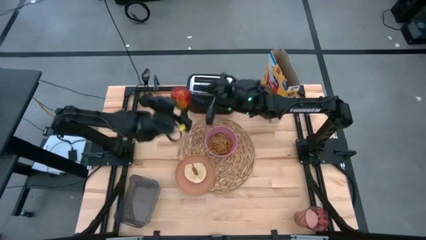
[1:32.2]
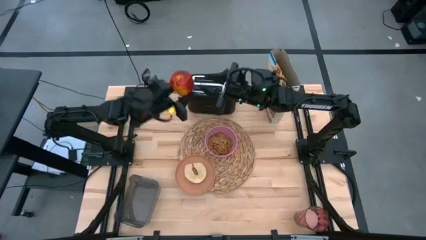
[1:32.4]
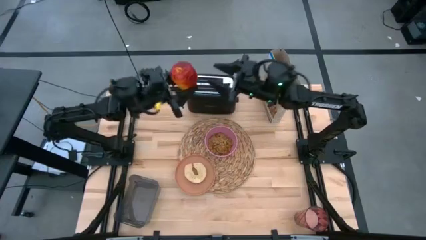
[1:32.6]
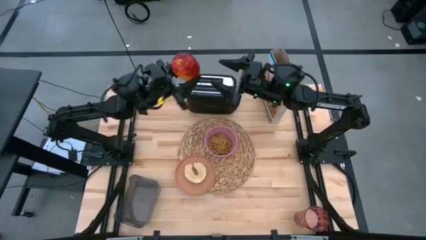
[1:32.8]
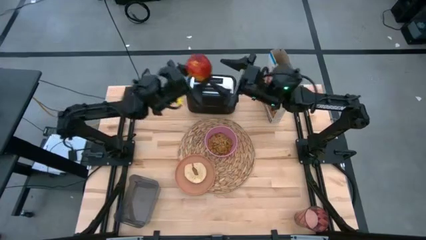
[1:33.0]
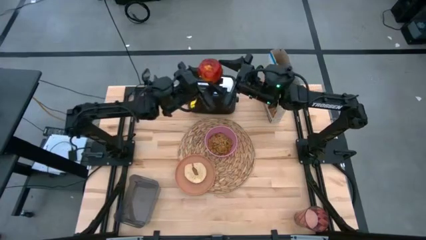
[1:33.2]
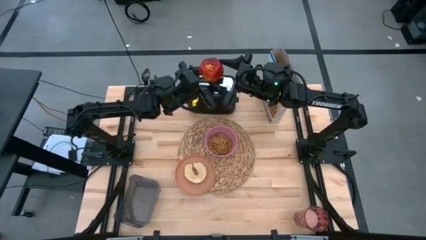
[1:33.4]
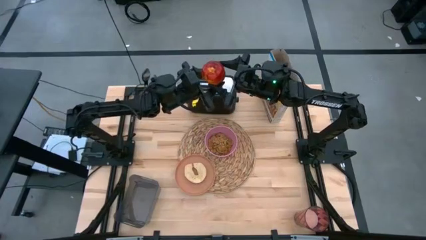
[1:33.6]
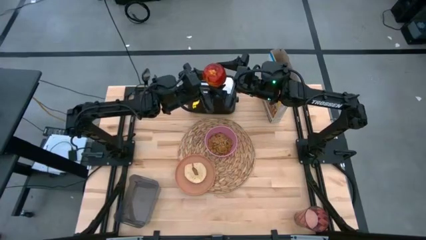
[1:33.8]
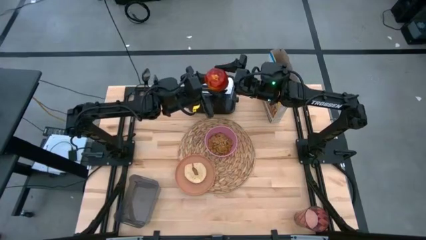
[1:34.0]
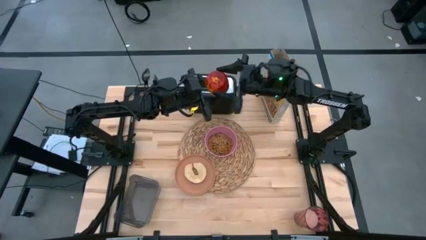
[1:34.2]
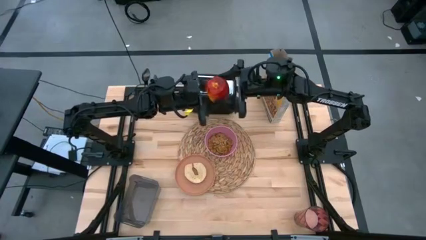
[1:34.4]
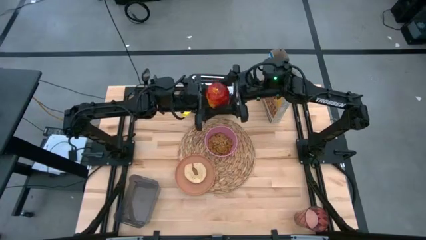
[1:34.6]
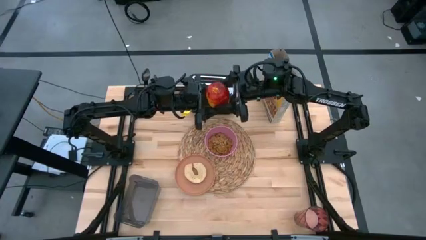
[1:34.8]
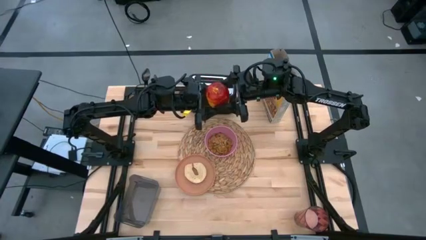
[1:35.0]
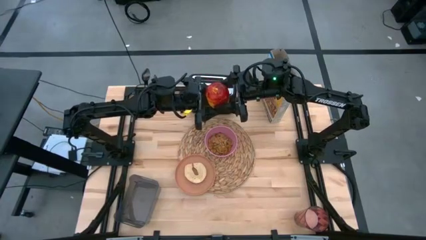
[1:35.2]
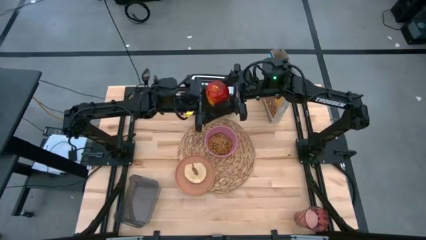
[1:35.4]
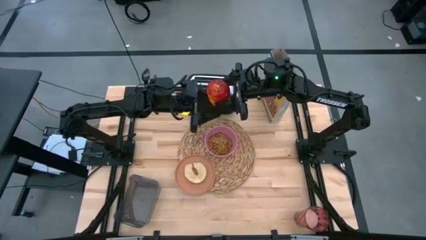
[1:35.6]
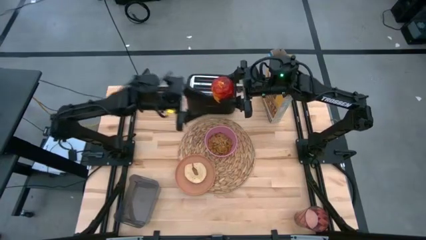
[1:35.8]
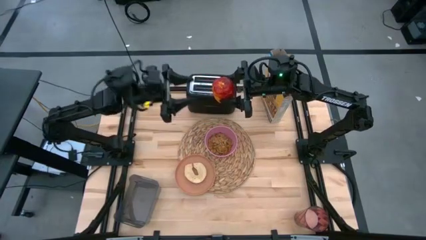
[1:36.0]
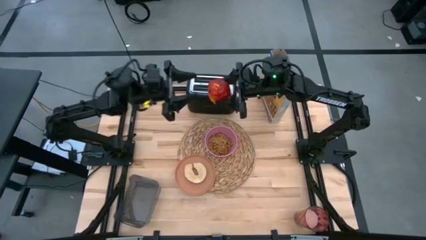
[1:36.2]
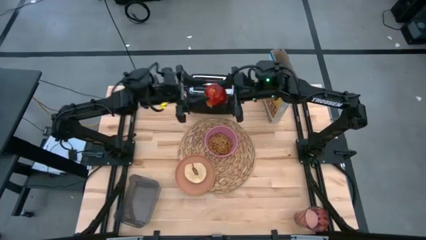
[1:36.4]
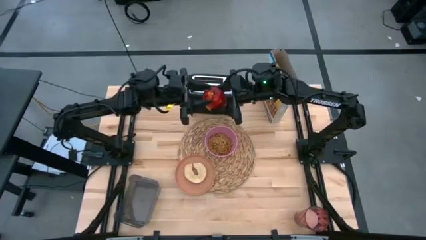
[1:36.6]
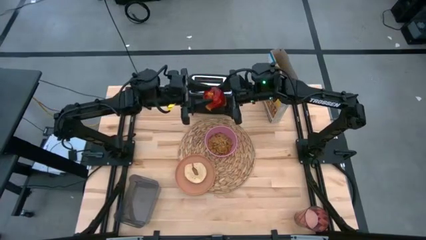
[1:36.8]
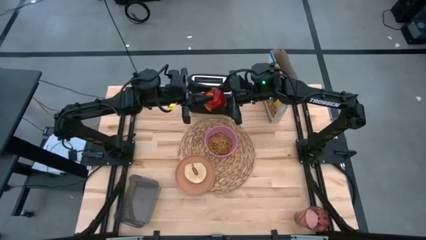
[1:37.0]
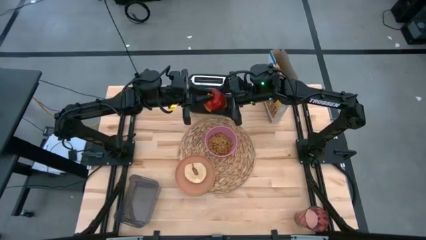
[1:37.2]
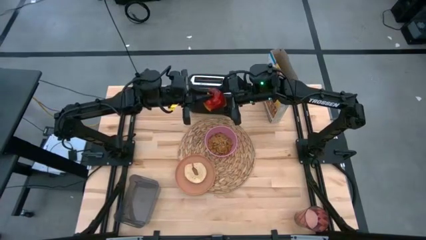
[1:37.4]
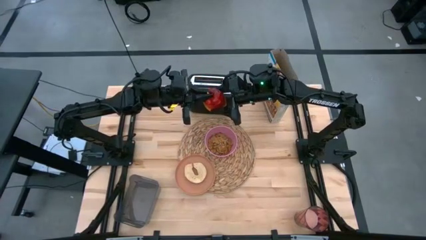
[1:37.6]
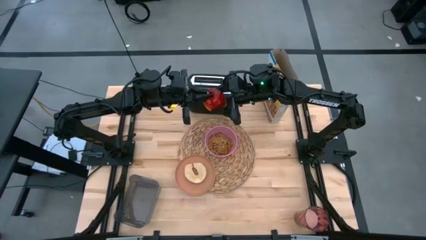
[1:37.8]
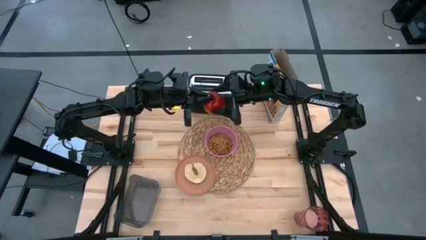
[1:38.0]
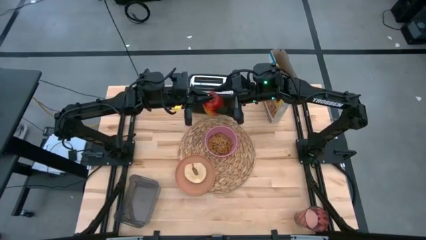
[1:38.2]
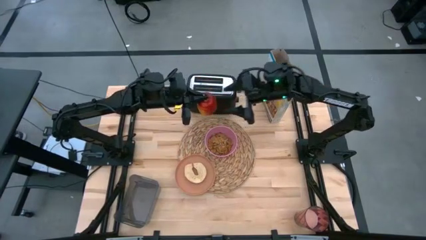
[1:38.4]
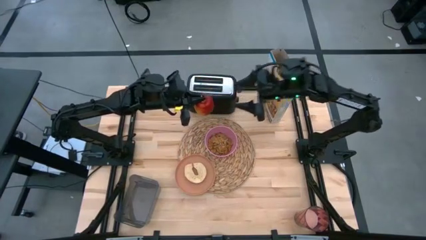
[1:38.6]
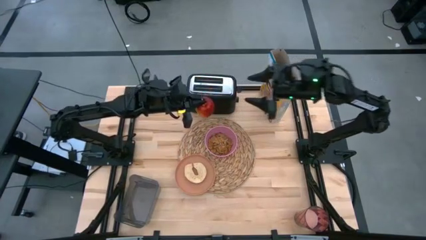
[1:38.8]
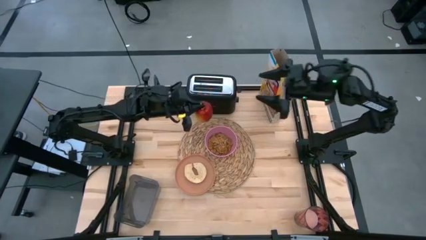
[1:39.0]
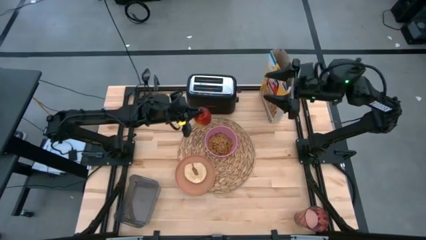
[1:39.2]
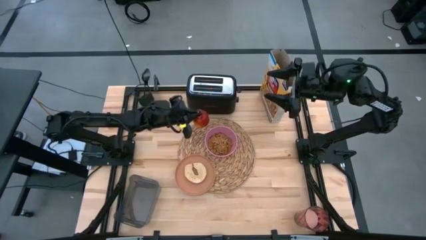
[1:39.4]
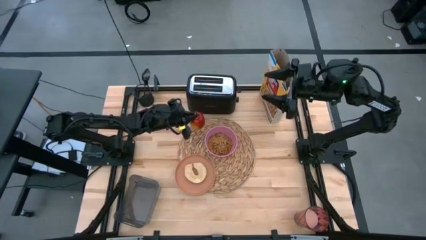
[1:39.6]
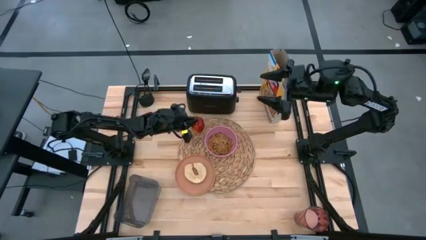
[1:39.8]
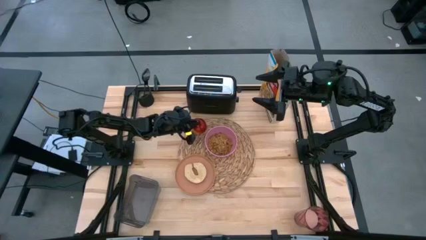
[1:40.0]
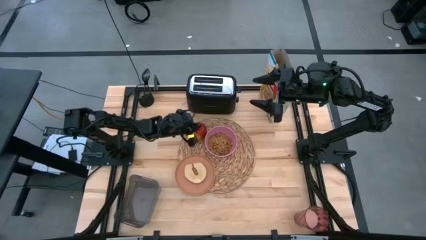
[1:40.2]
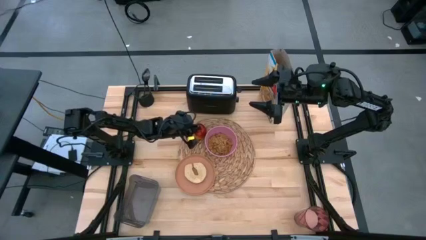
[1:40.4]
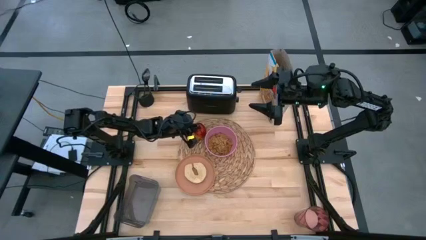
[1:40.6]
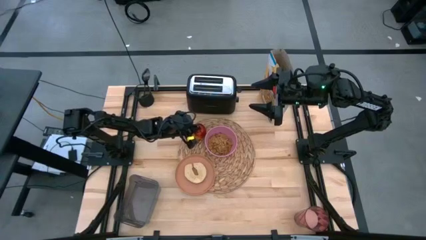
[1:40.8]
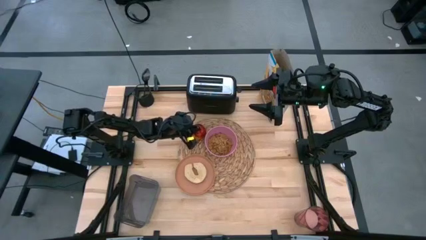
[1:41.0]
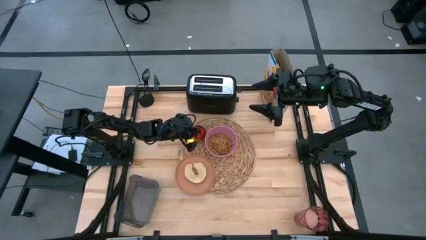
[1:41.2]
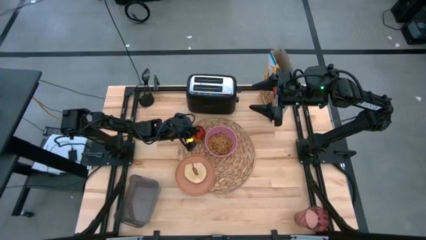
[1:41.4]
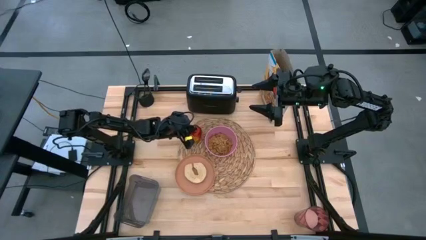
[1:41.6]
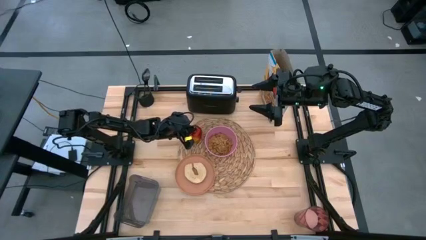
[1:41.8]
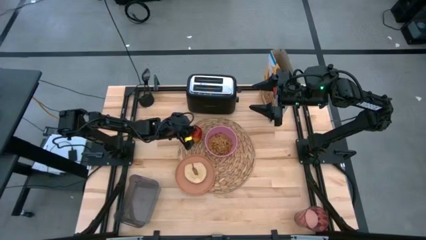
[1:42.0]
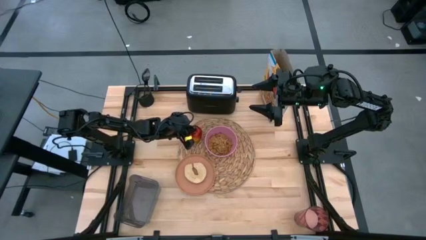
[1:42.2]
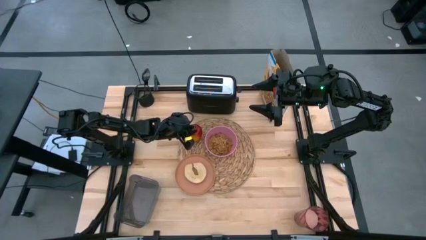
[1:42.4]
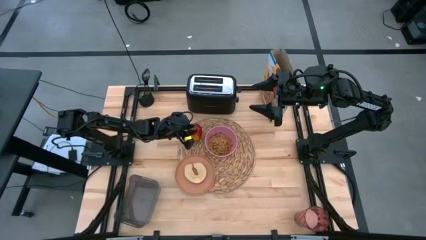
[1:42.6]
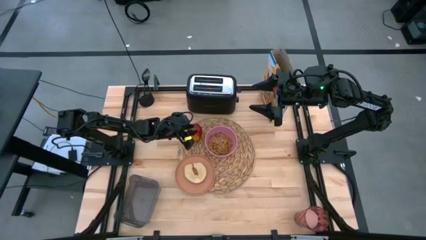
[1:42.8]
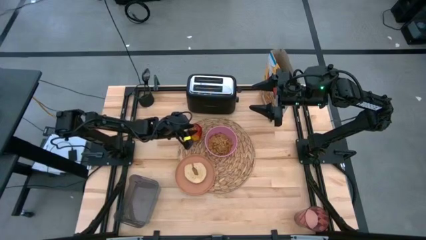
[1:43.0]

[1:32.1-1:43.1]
Task: Arrange a breakfast setting
Put the apple on the brown placemat

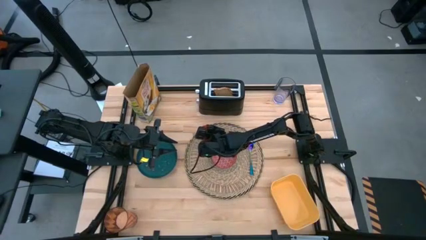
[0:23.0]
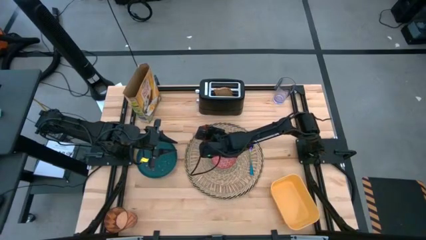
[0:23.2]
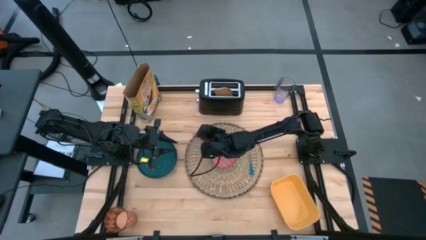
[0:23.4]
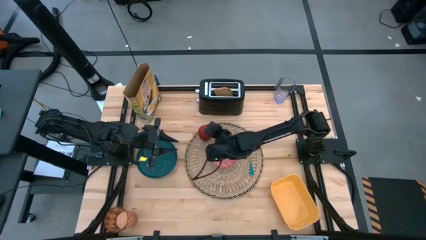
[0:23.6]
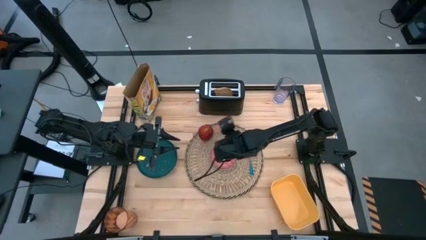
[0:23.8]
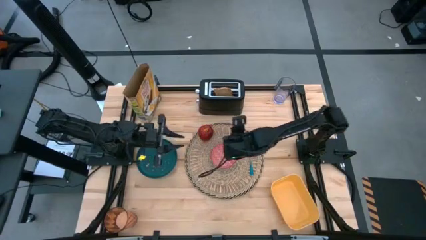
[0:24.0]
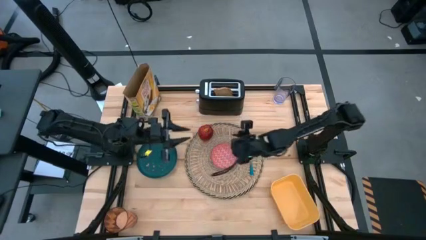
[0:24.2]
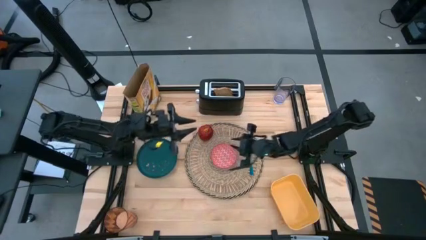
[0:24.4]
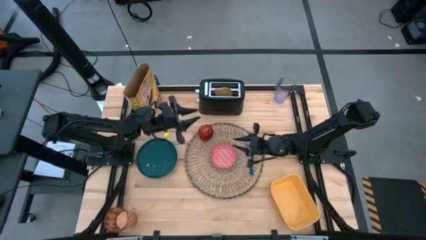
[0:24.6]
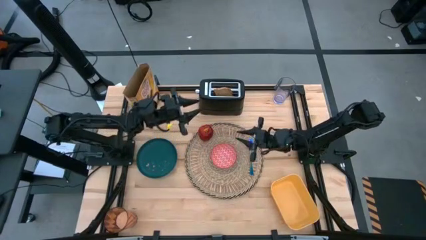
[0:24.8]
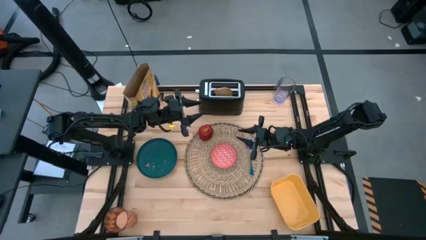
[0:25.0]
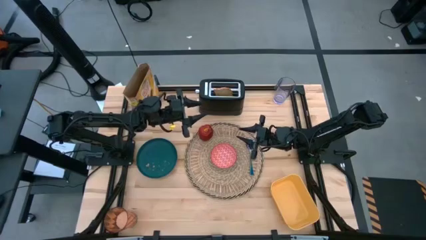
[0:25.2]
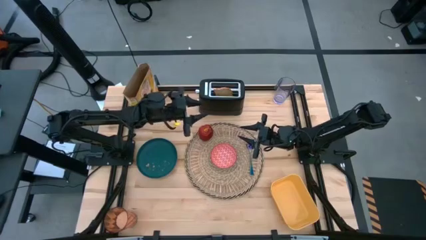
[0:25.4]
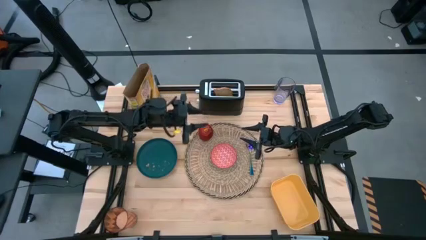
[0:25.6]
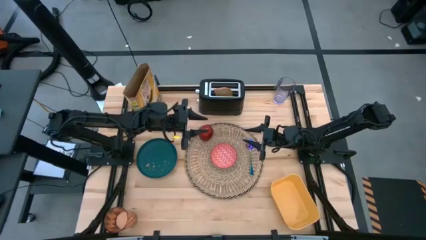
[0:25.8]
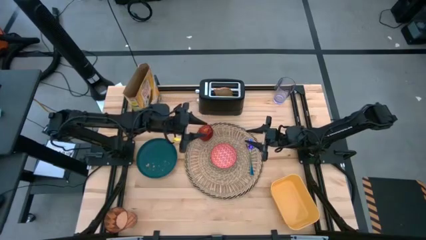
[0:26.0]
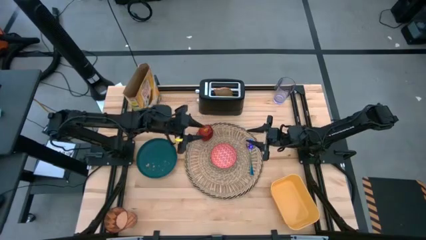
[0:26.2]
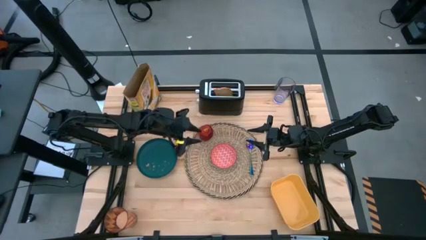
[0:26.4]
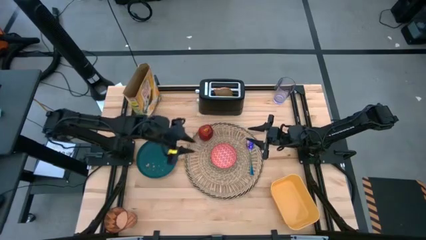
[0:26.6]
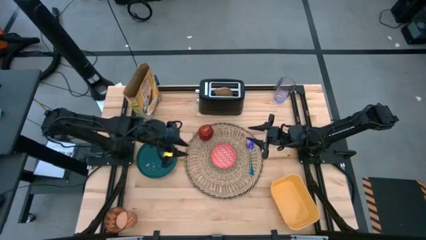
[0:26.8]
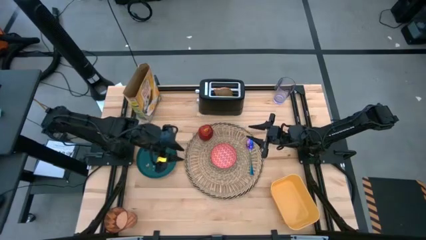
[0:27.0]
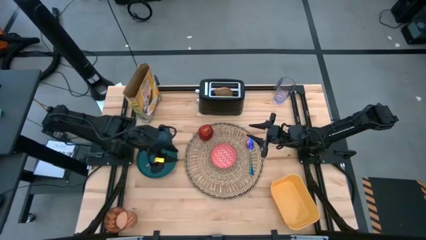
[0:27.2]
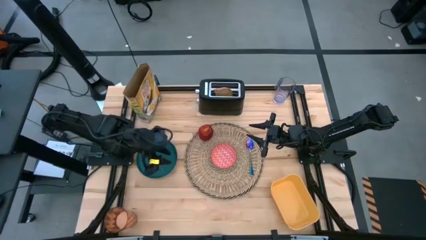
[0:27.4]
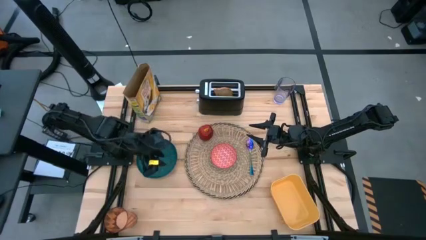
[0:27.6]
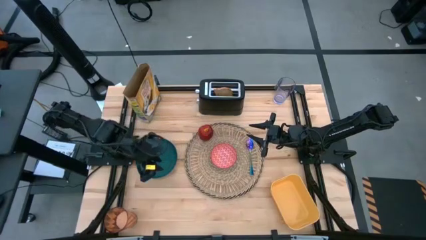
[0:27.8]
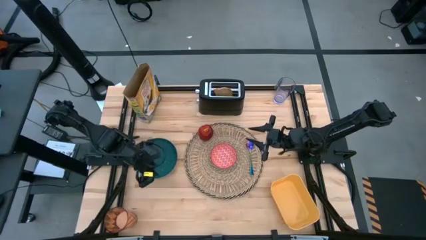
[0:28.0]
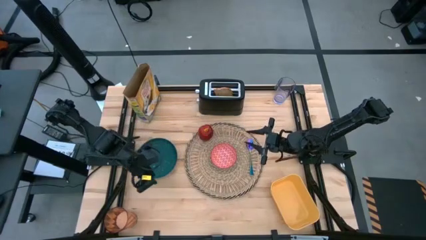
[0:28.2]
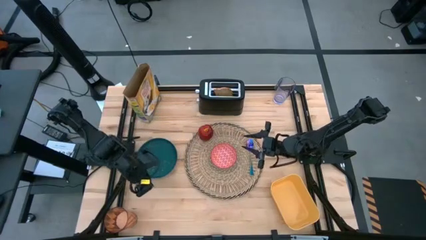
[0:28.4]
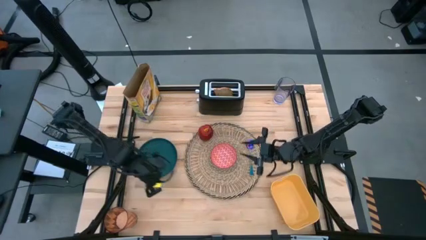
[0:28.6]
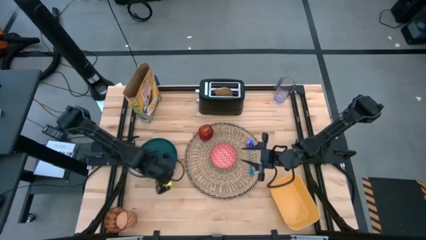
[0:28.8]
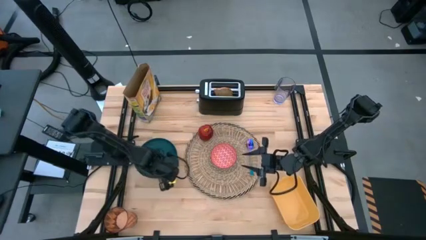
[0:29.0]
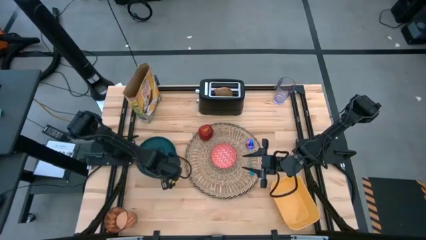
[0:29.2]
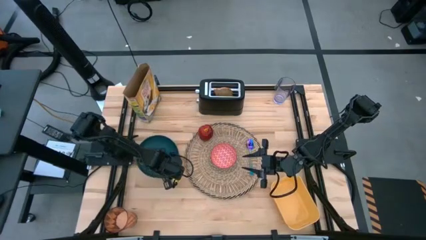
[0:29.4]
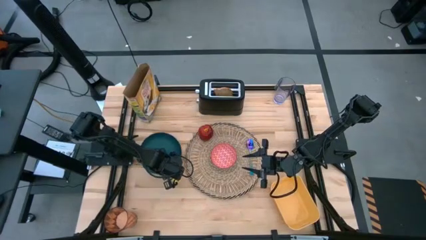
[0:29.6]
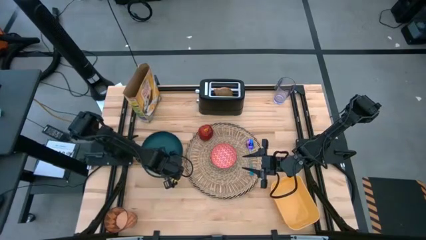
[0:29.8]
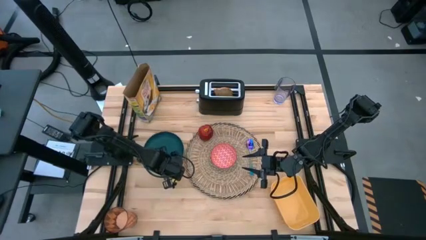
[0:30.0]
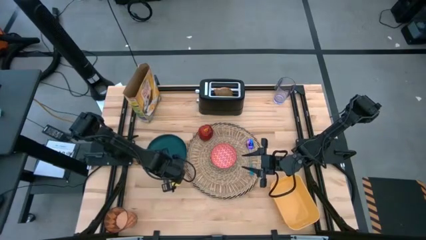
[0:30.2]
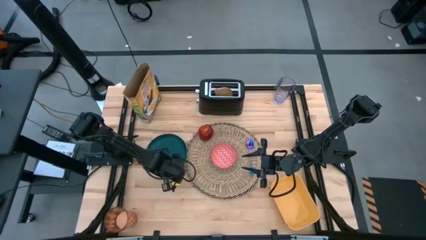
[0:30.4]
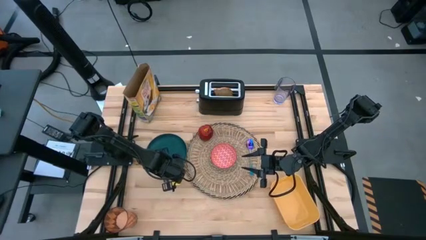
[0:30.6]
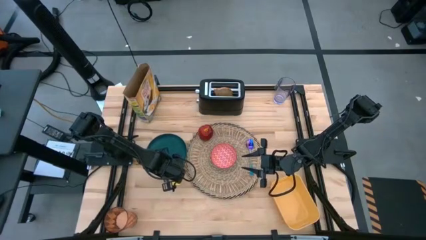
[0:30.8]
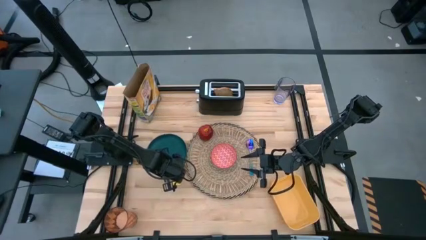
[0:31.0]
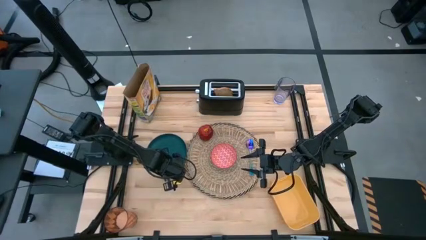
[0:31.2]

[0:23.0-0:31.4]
Task: Arrange a breakfast setting
Put the blue plate on the brown table mat
